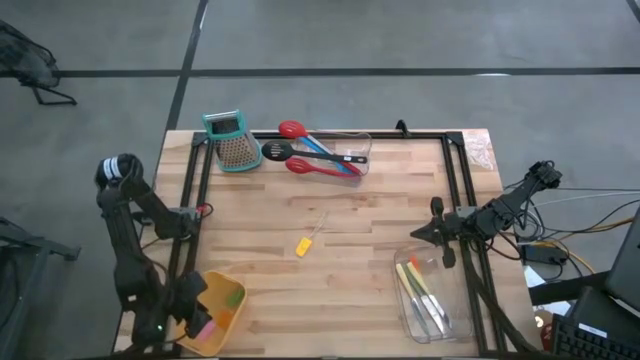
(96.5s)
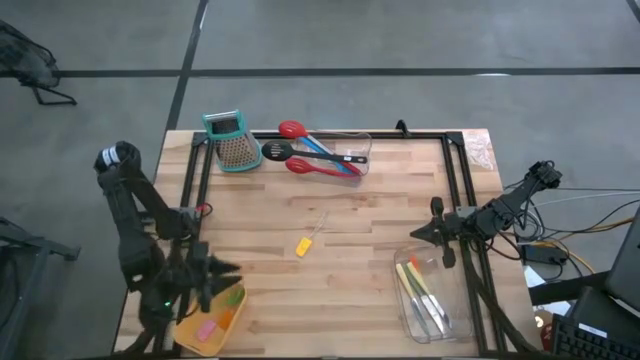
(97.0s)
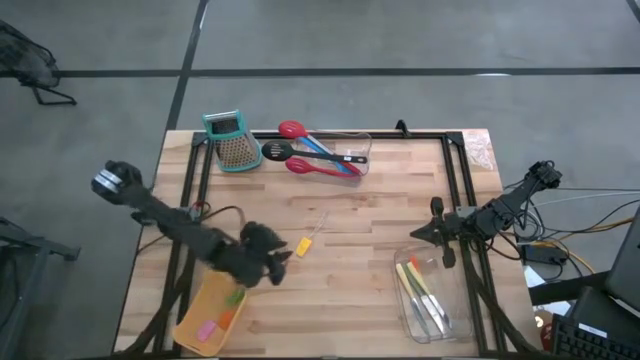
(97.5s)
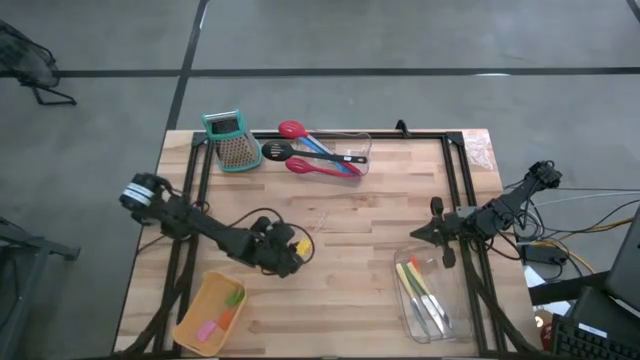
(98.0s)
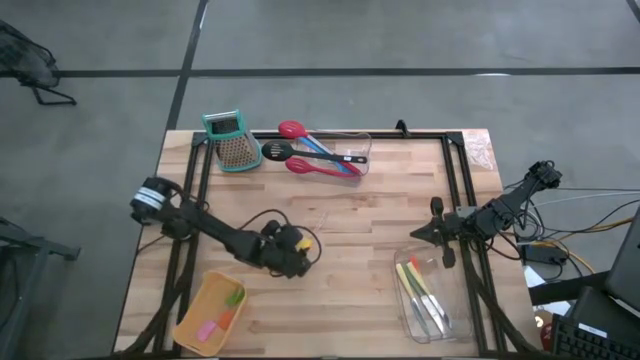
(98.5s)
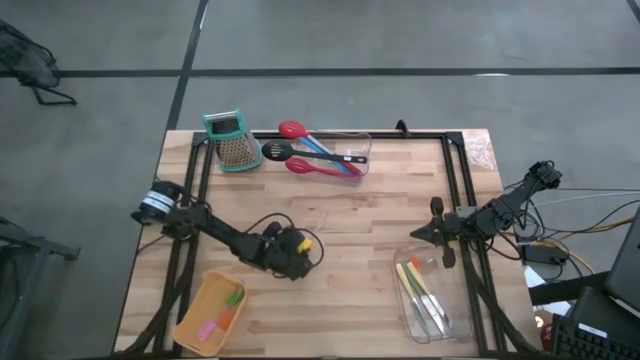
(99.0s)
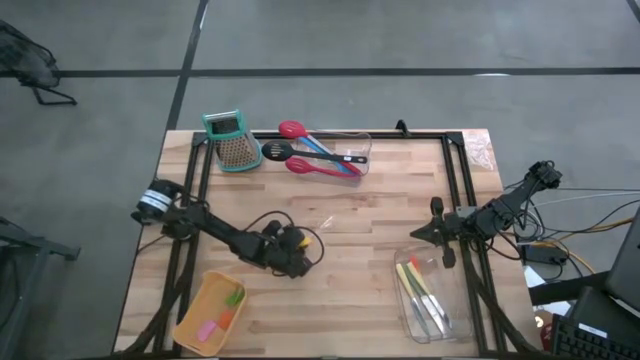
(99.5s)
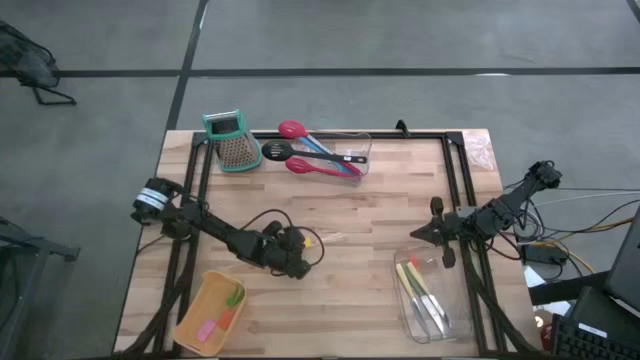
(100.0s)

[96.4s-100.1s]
Task: Pick & Place Kitchen Items
Put the yellow spatula into the yellow bin

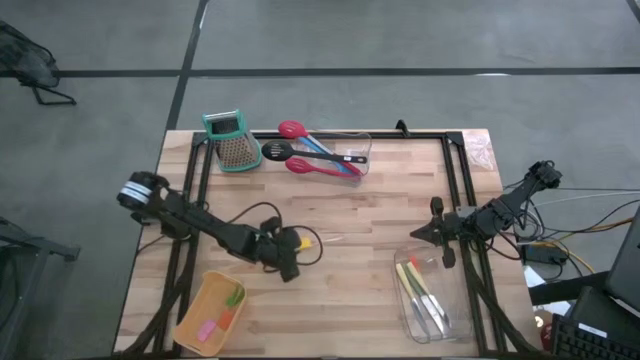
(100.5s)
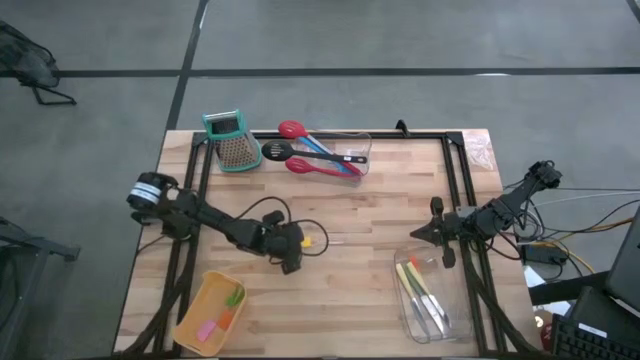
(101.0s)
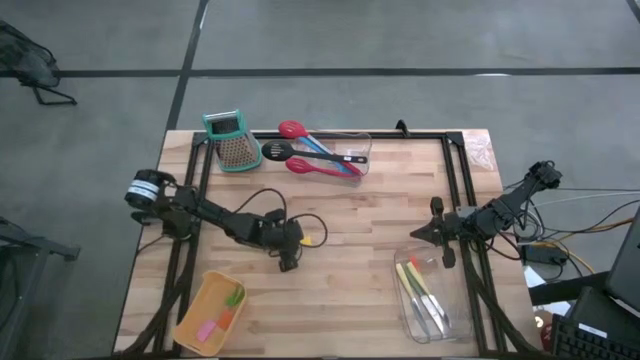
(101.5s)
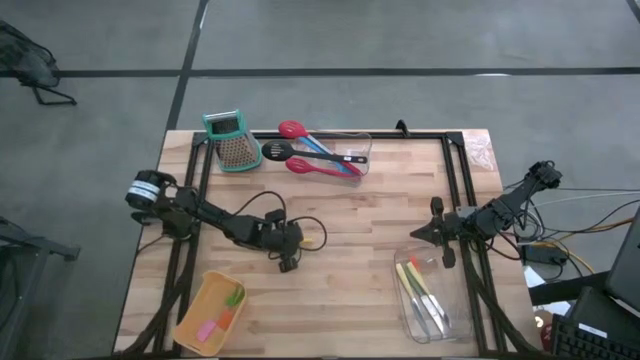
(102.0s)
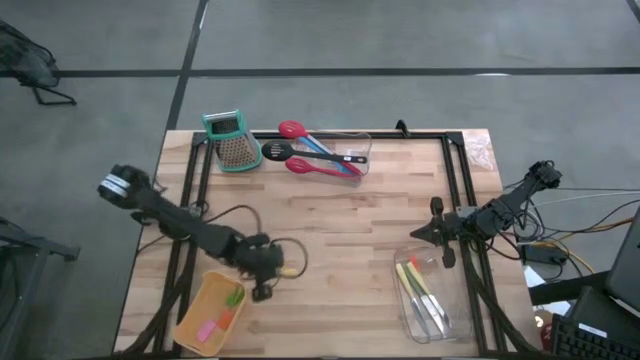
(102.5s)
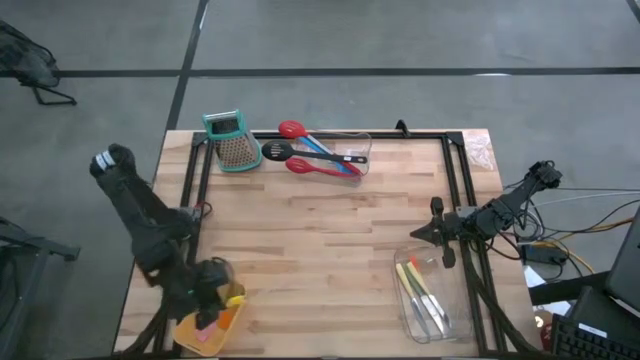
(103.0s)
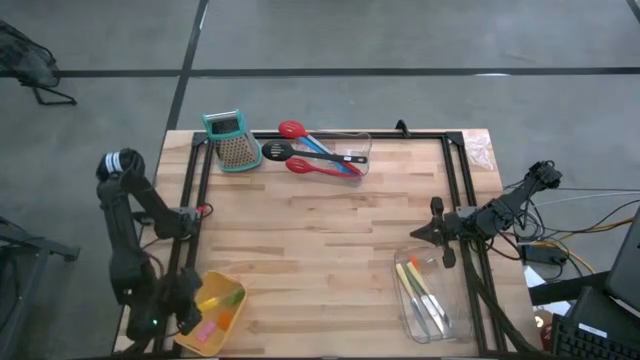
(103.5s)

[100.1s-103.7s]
Put the yellow spatula into the yellow bin

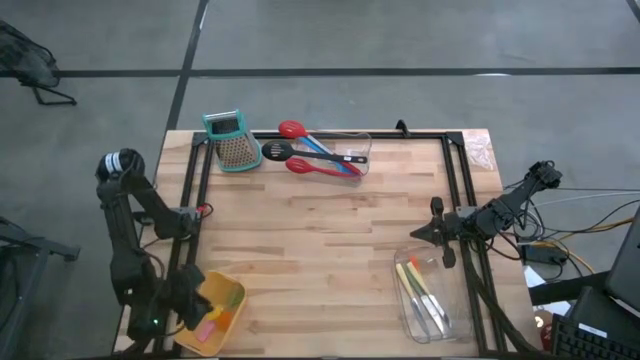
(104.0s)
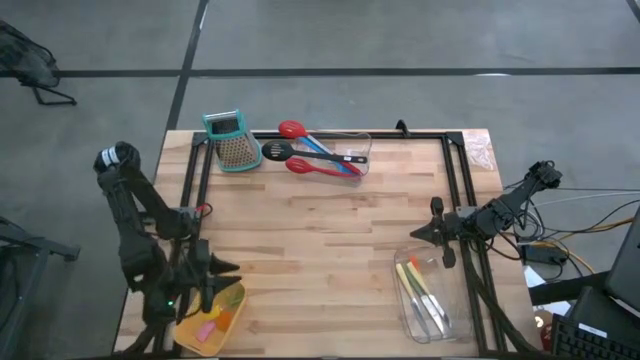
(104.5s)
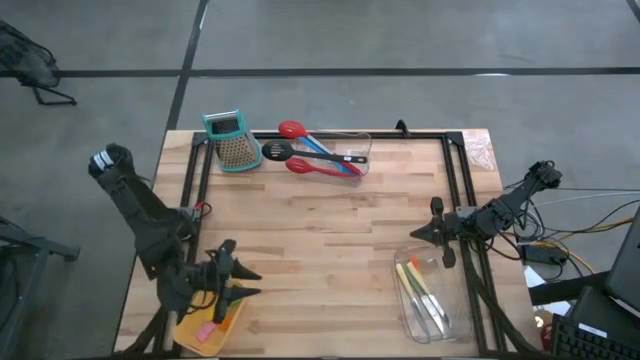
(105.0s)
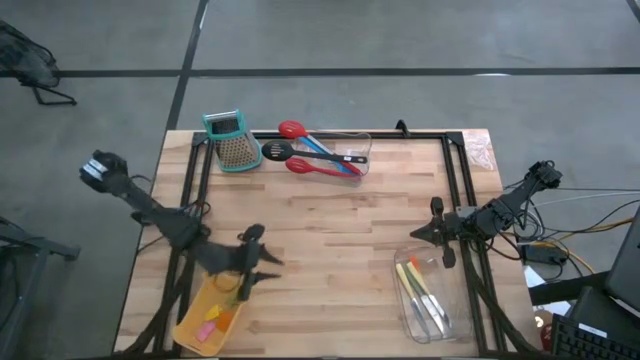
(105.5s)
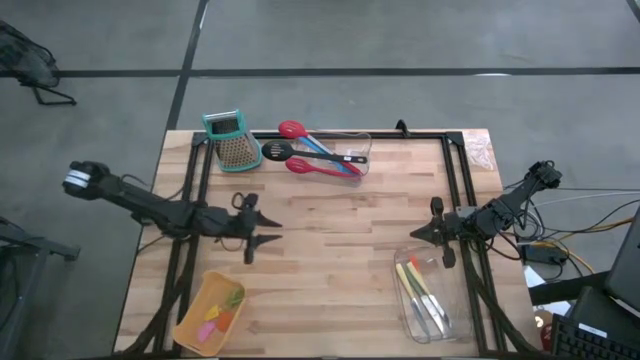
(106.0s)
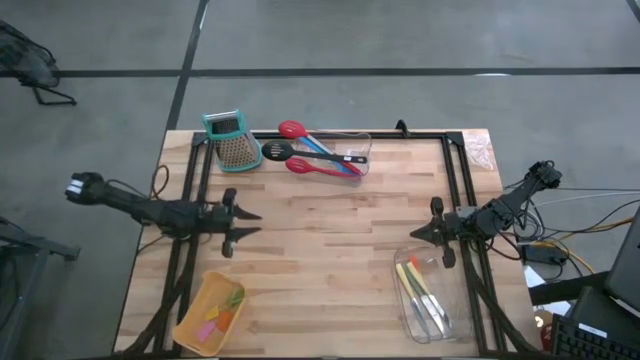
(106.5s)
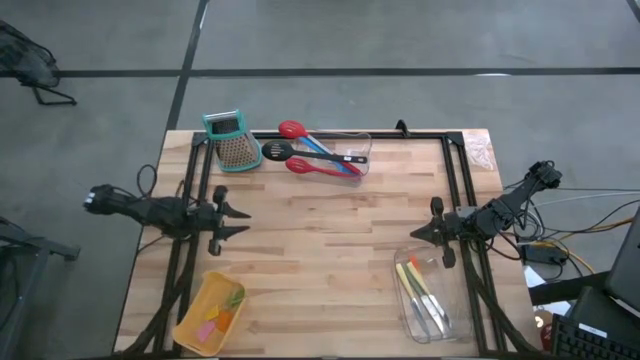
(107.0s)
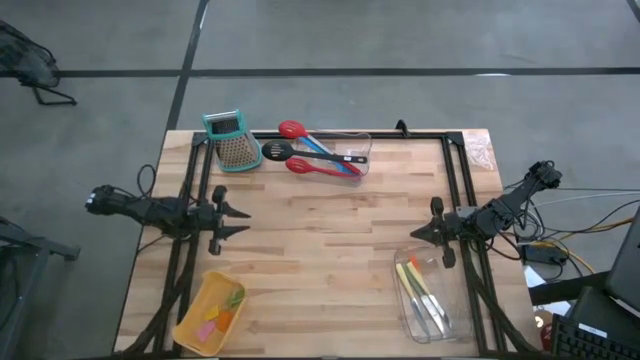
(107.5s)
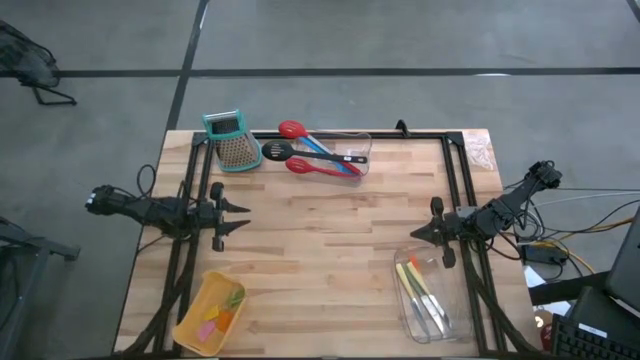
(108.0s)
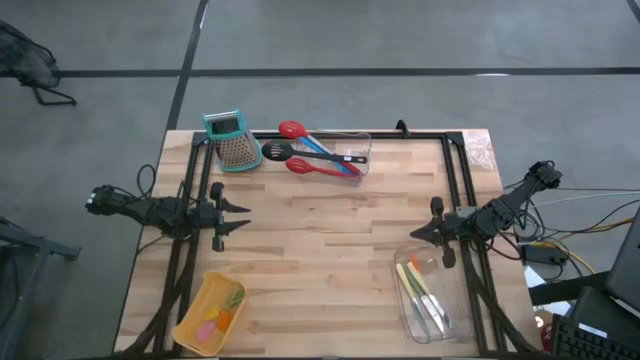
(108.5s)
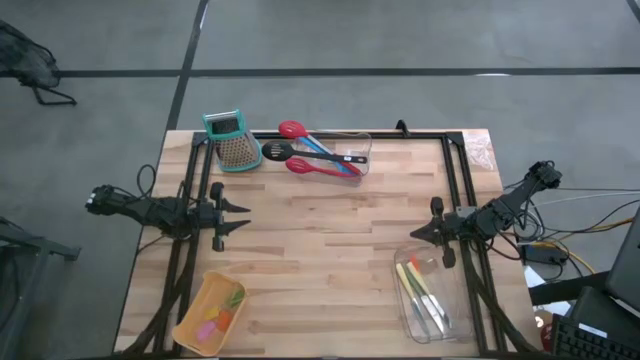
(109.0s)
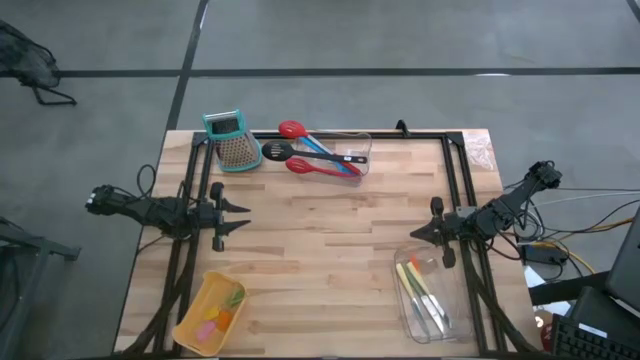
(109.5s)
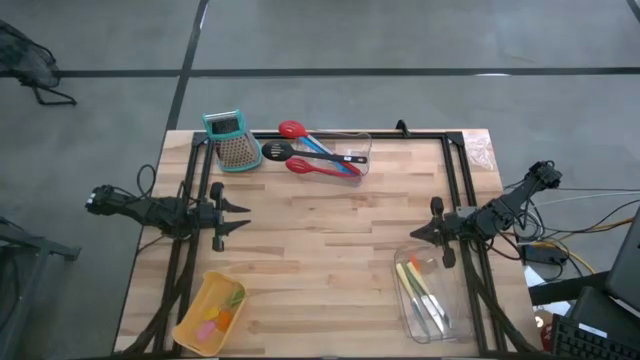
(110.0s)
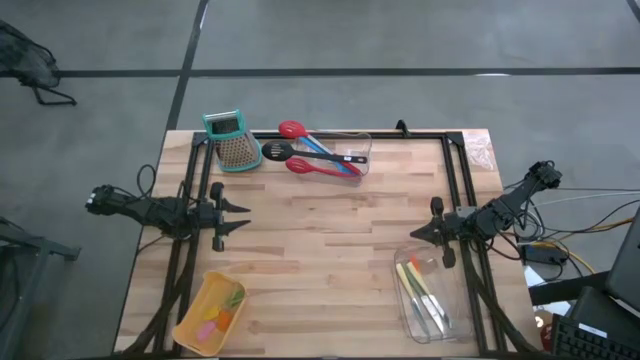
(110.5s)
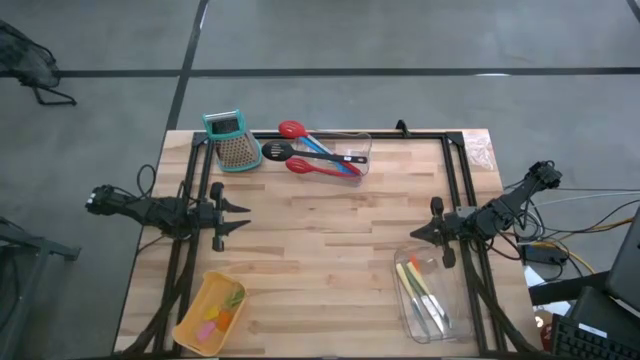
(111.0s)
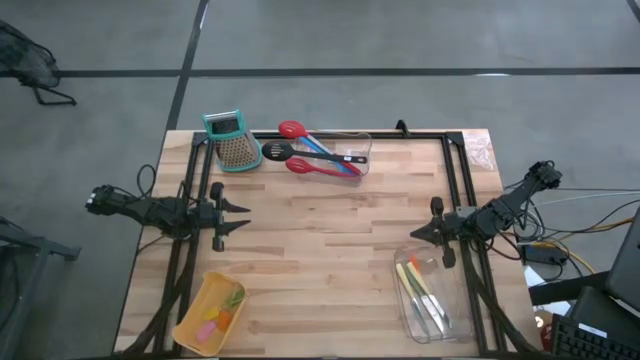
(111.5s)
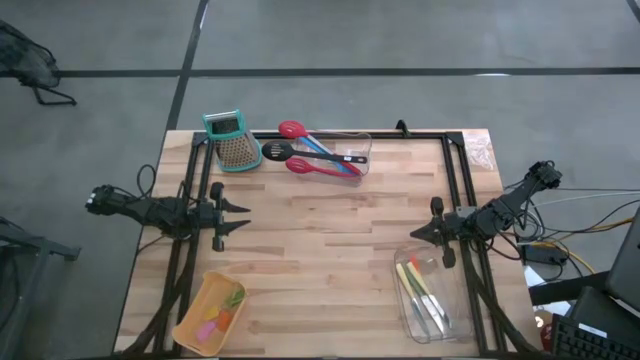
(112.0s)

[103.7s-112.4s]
Return to Home Position

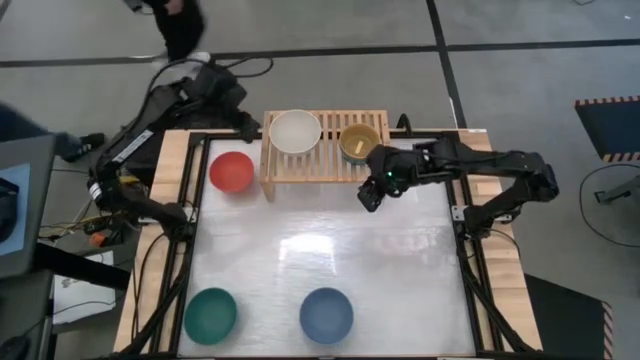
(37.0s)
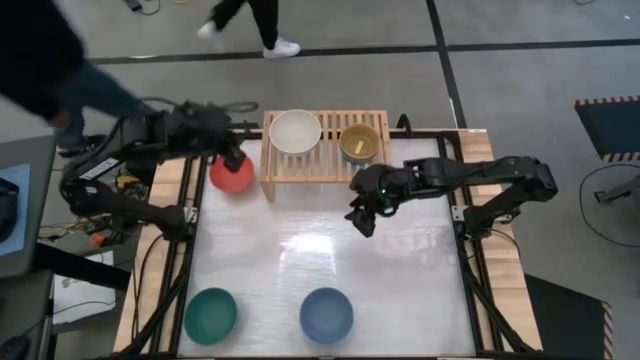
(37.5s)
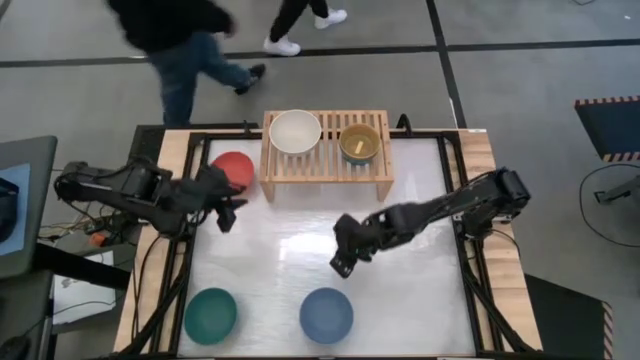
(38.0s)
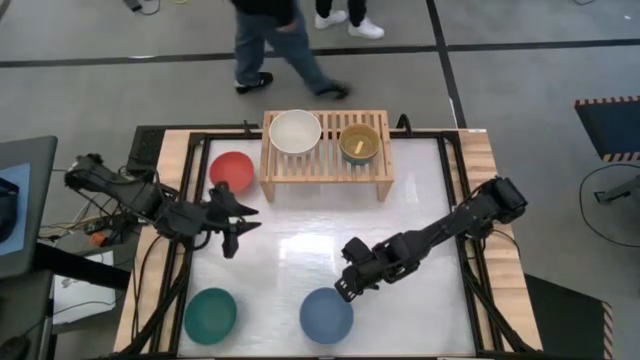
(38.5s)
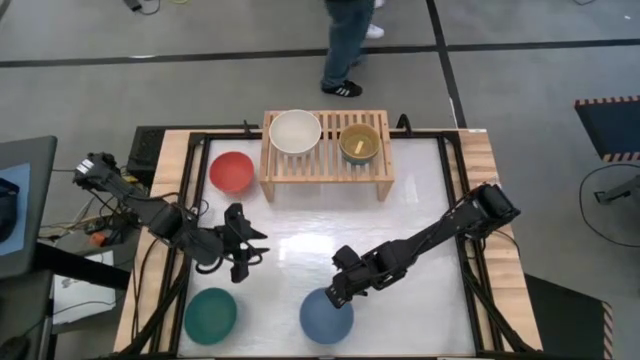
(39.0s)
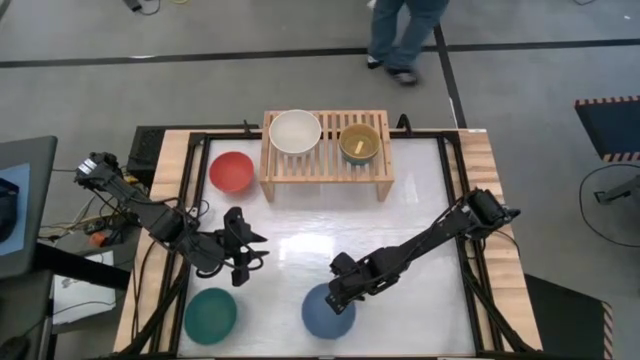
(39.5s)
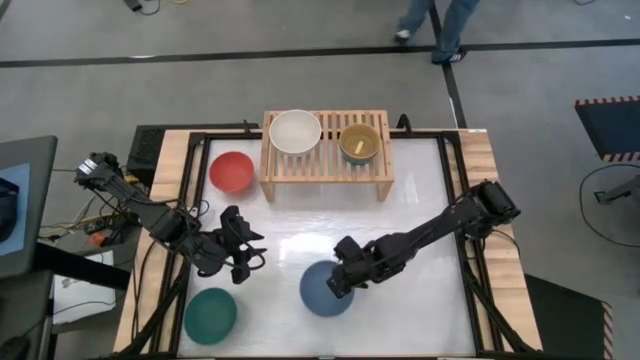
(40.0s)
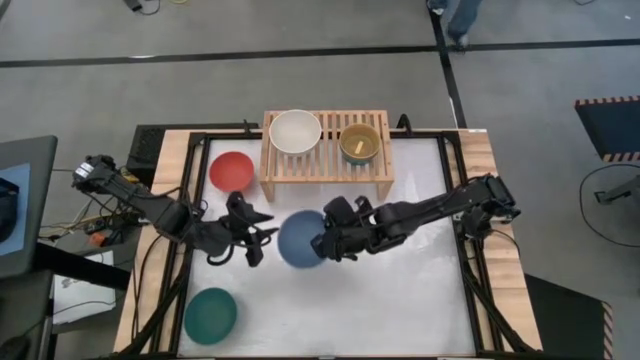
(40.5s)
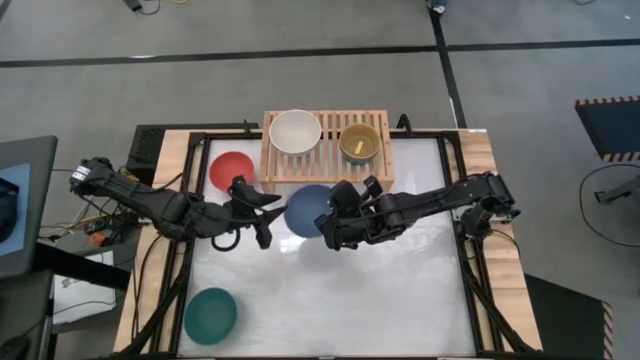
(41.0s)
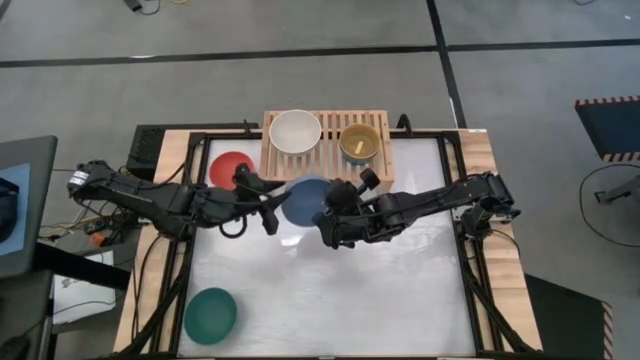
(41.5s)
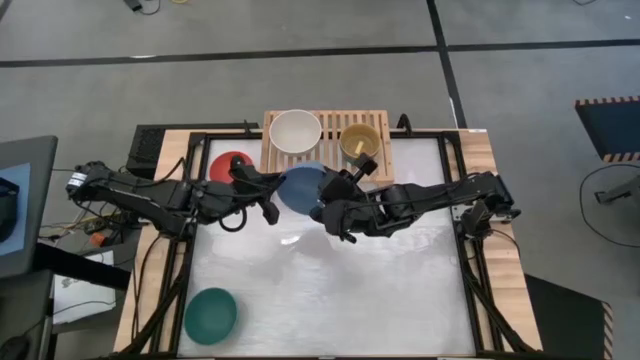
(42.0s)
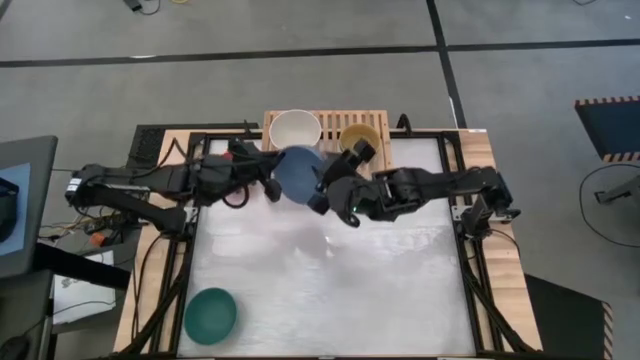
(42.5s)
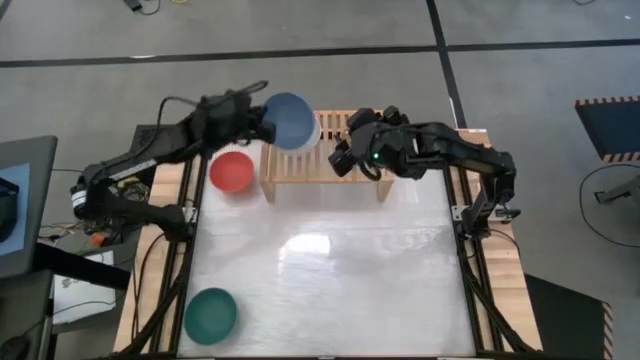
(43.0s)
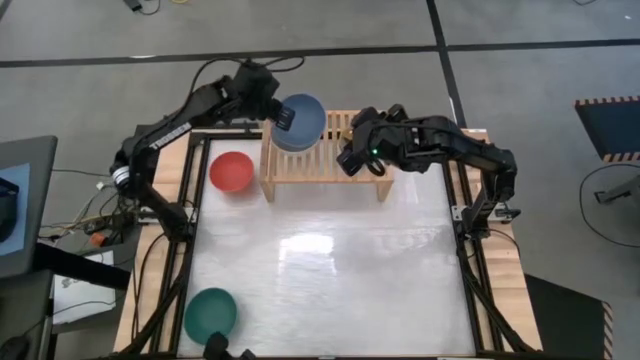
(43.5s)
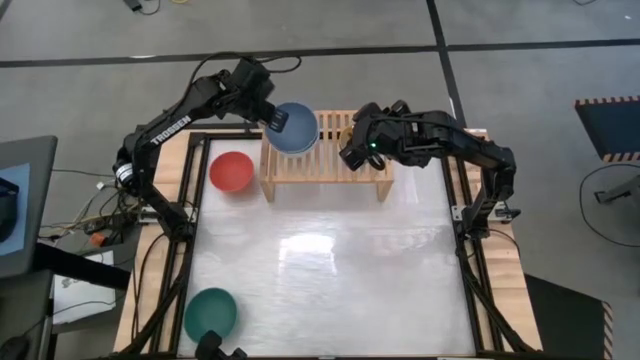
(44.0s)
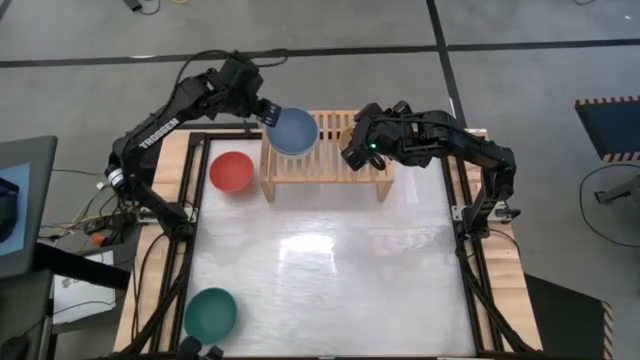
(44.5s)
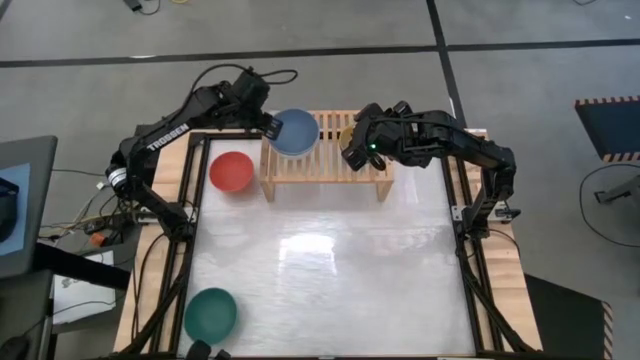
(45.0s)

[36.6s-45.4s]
Task: Place and stack bowls onto a shelf
Stack the large blue bowl on top of the large white bowl on the shelf
